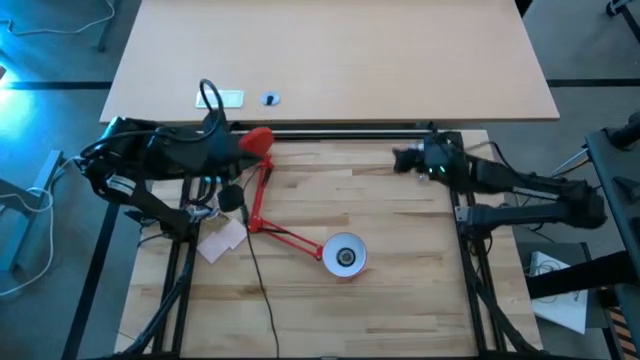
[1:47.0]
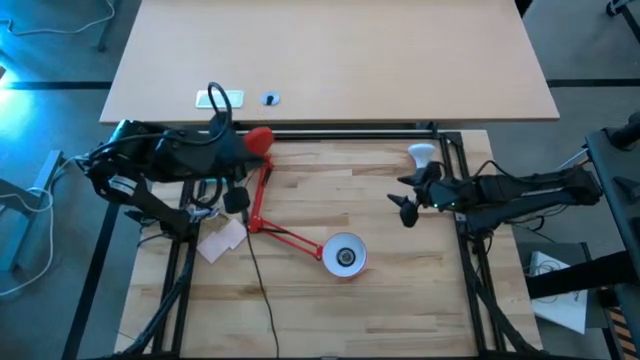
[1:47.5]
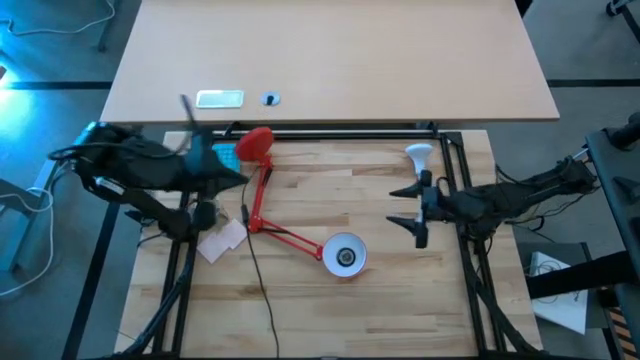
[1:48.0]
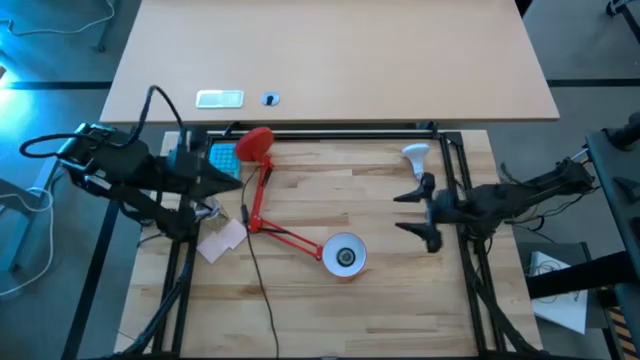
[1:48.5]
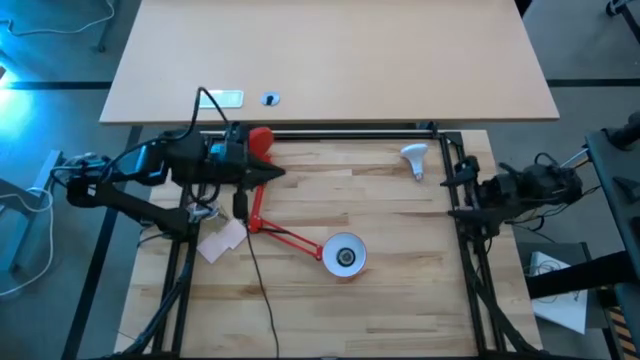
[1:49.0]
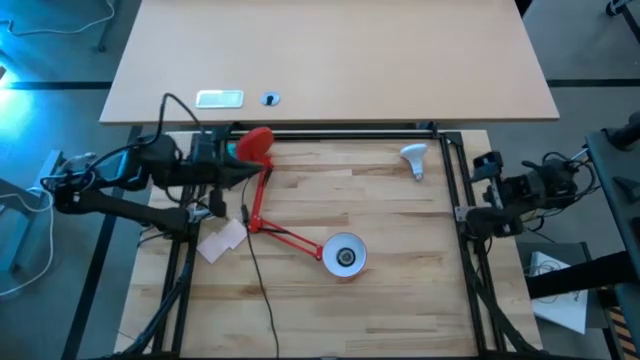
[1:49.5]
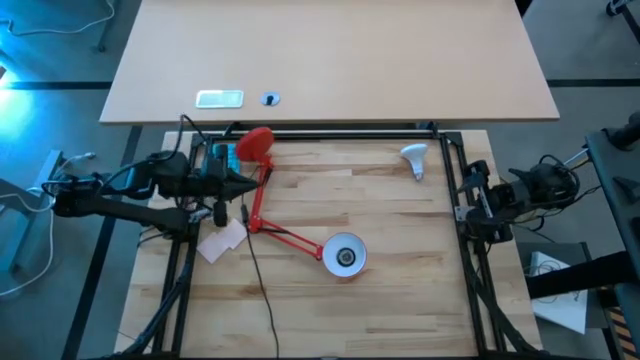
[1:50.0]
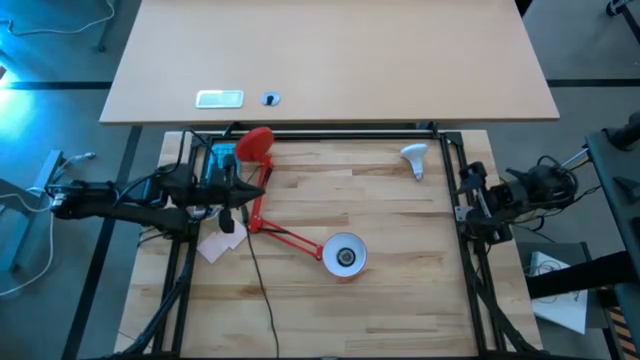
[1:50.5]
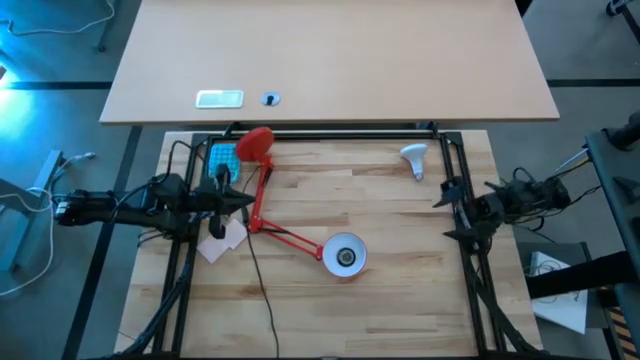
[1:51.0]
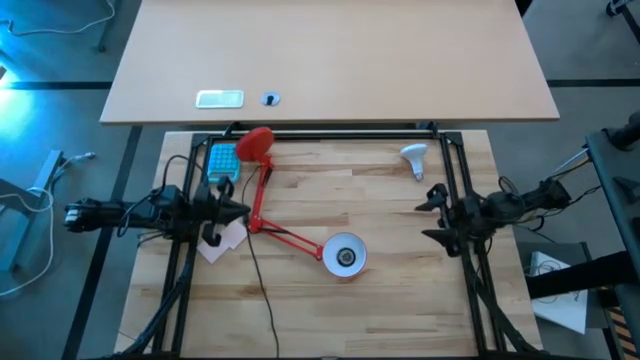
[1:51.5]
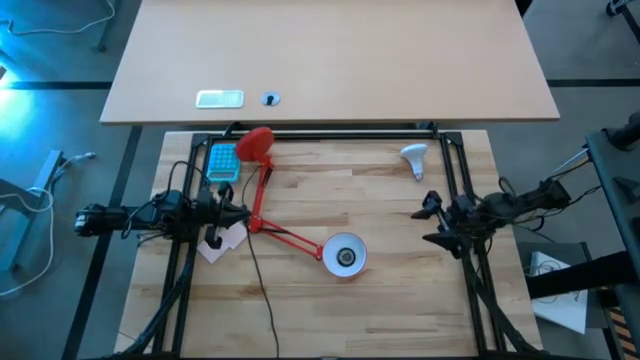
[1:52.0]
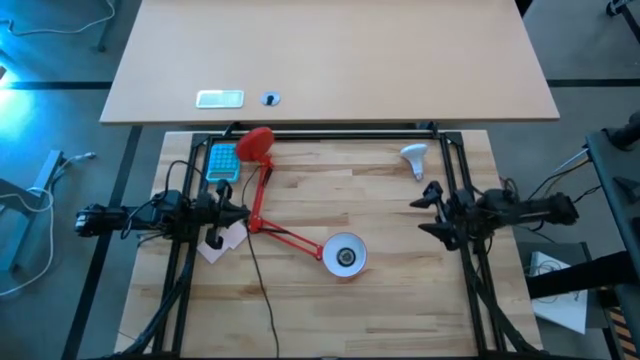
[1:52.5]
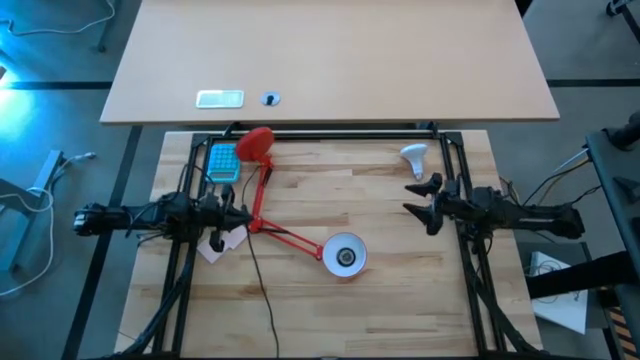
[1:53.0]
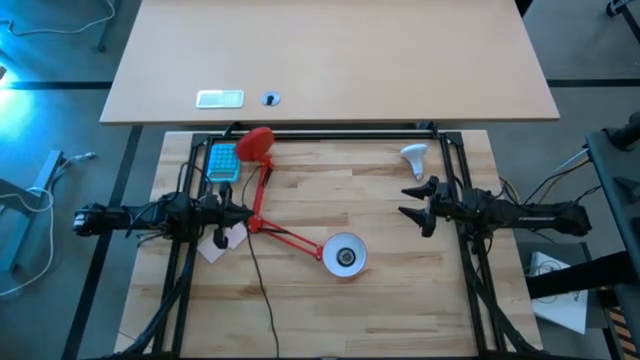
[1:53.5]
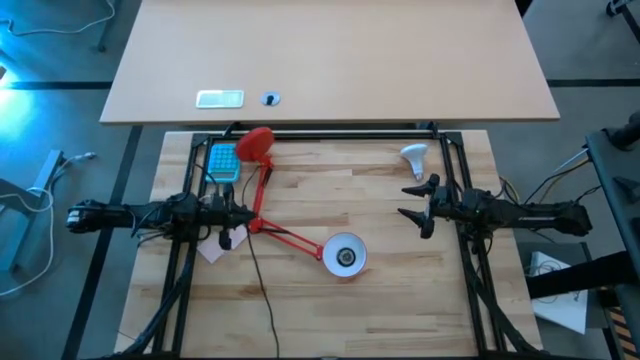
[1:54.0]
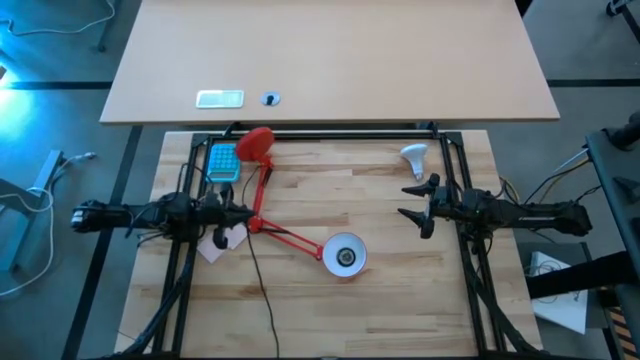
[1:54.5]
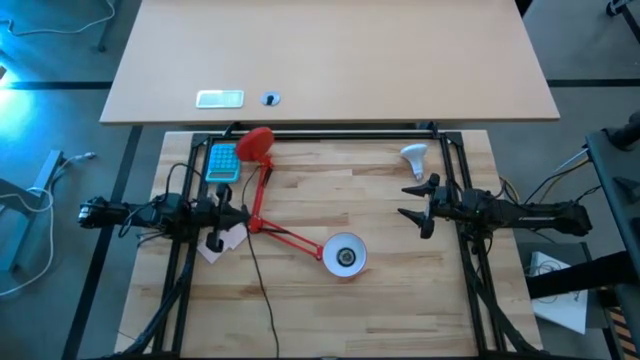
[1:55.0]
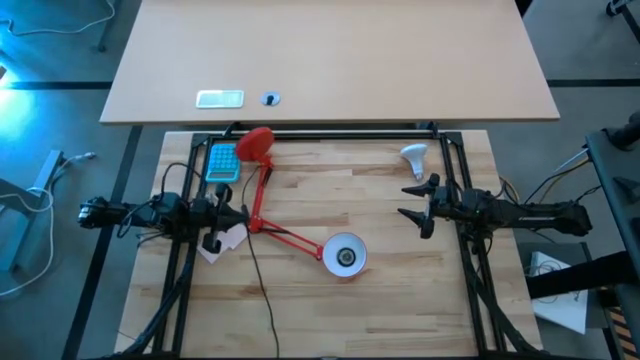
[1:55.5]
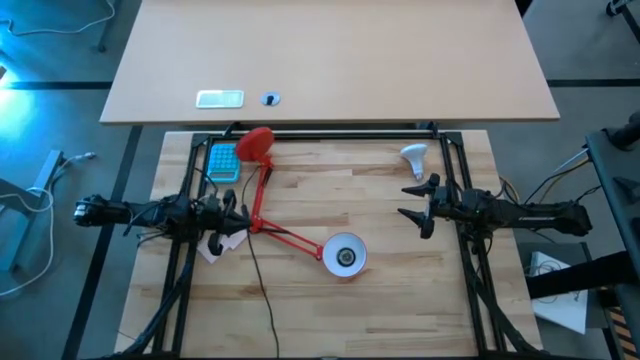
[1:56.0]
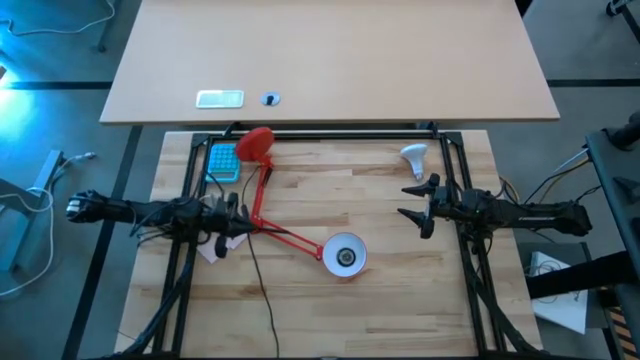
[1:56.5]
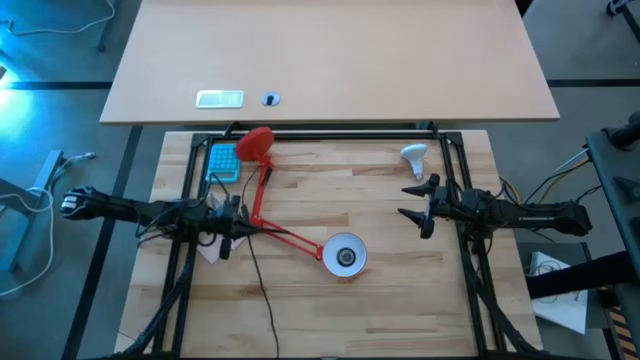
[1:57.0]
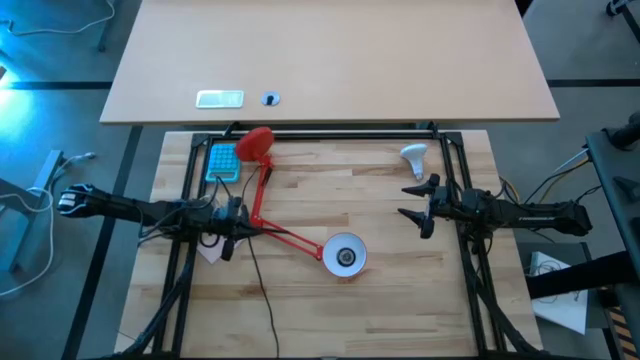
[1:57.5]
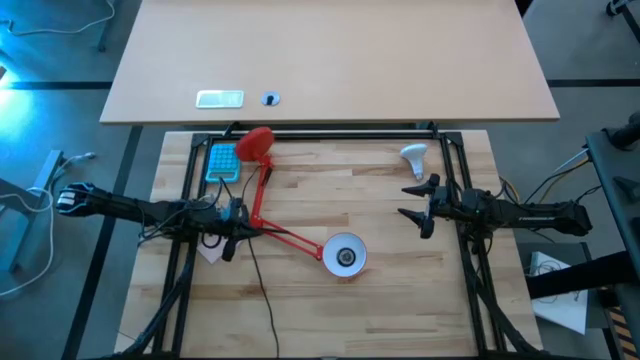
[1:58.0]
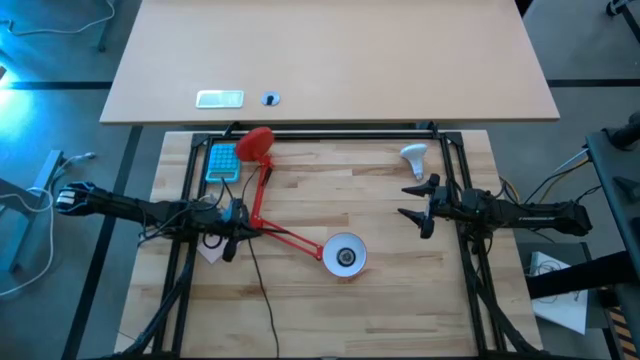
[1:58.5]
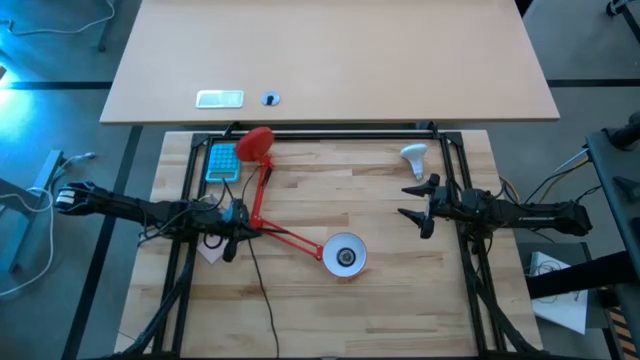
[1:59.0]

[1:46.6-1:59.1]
Task: Screw lightbulb
Return to Home Position
